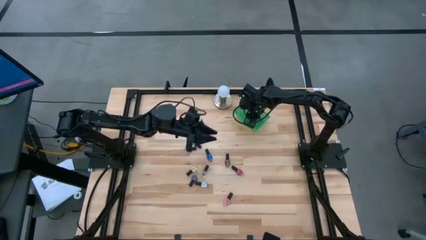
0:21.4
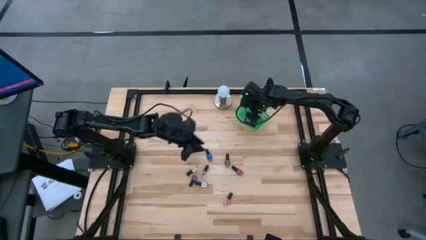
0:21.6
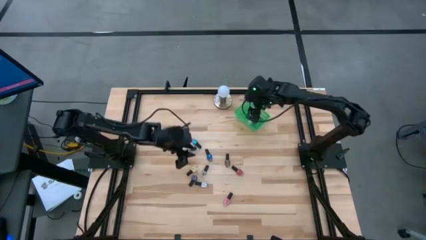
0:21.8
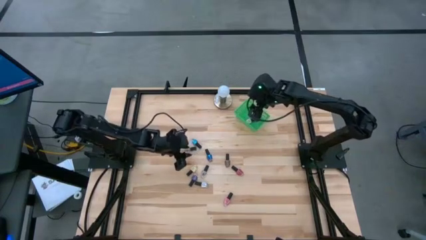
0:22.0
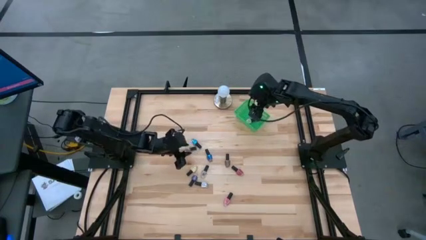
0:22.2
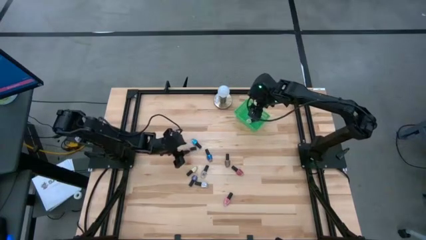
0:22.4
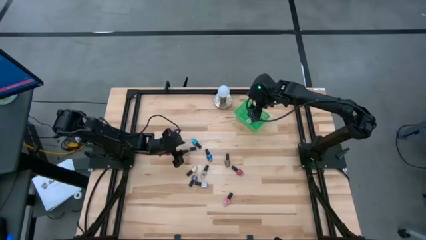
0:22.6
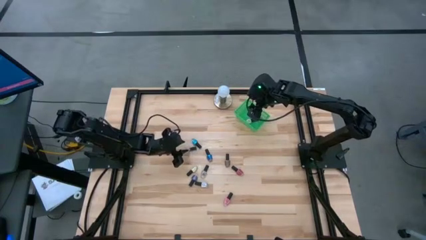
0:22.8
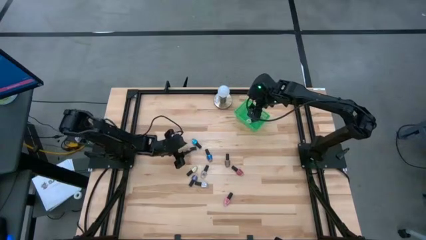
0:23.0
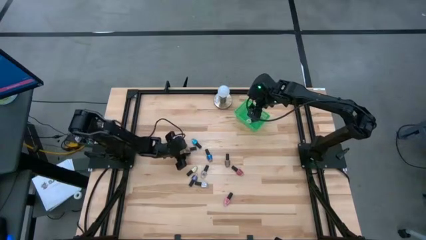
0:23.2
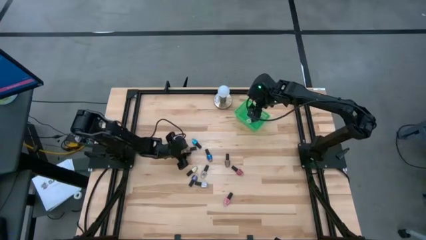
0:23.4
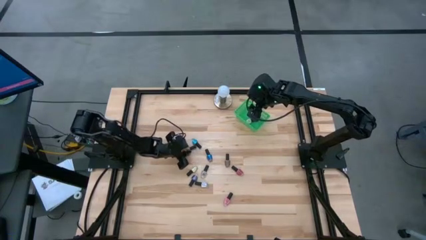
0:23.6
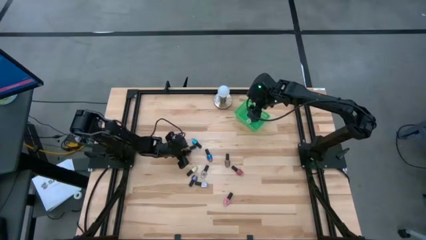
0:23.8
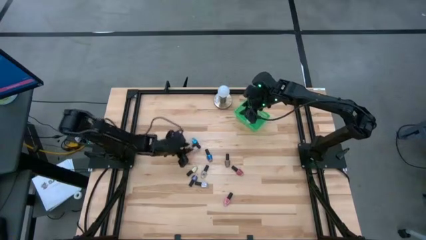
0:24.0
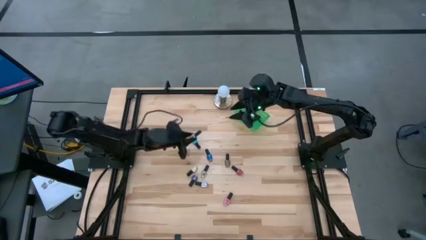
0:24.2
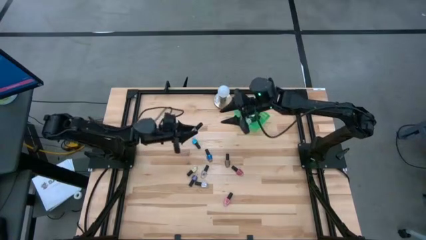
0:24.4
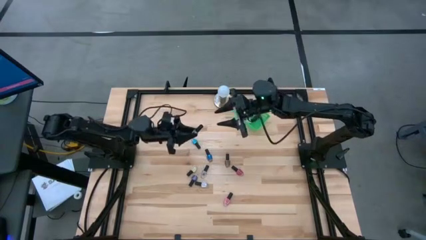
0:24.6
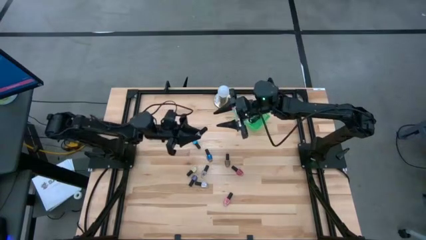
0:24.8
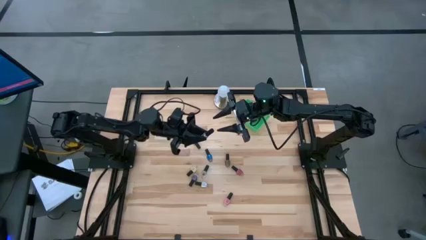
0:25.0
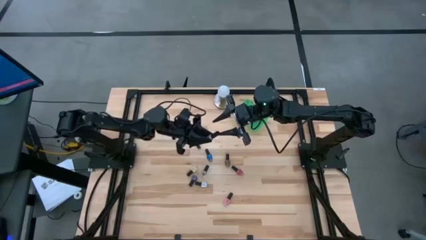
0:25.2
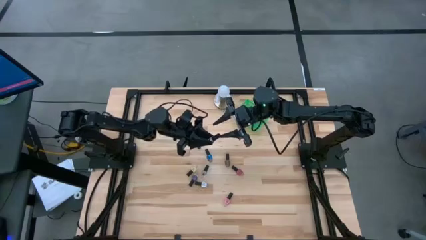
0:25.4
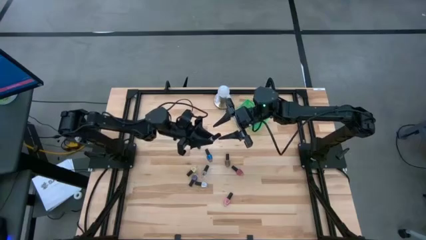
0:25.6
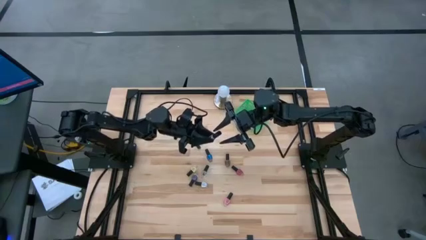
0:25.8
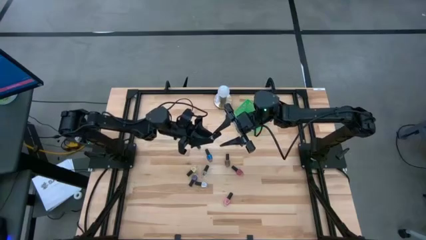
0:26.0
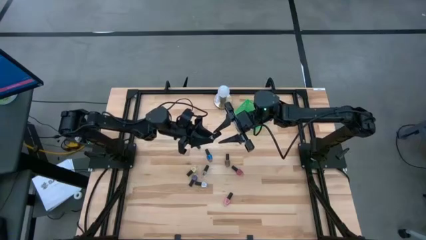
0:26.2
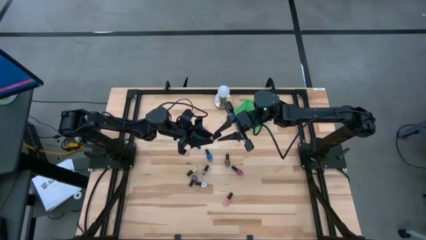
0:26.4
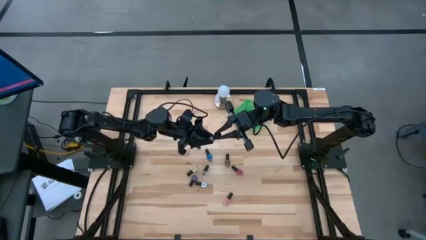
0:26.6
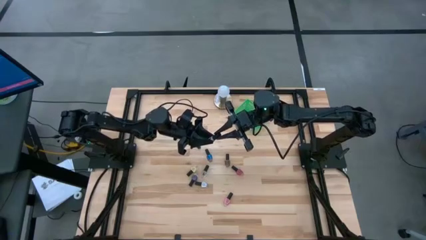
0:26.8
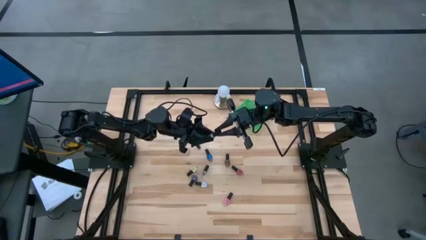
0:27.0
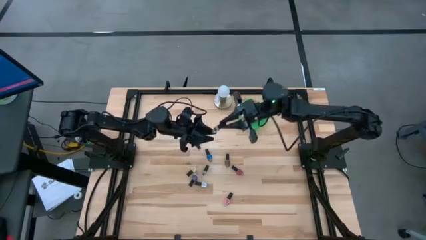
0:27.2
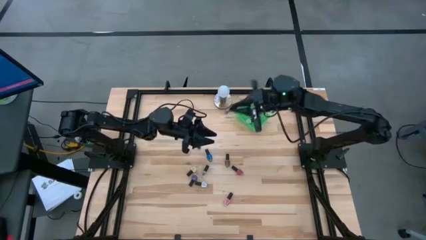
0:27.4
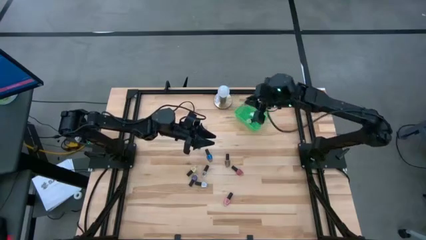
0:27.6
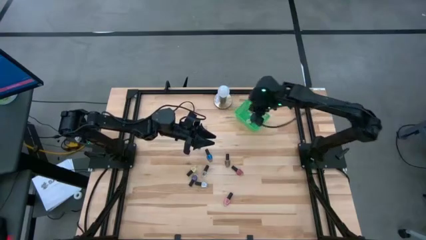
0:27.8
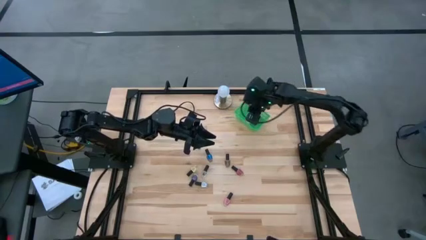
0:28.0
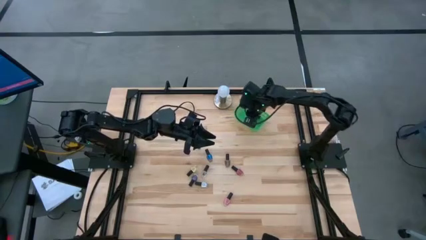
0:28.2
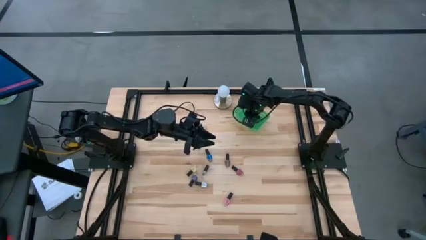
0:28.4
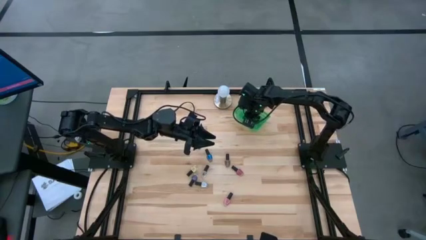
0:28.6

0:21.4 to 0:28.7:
Task: Pick & Place Nail Polish
Put the top transparent nail polish bottle into the green bin

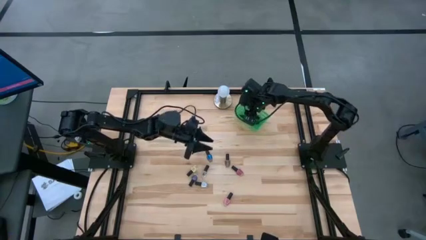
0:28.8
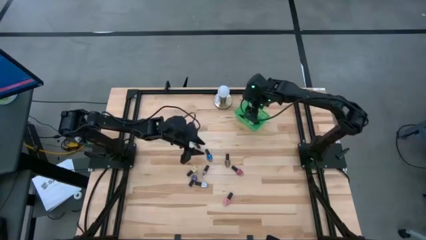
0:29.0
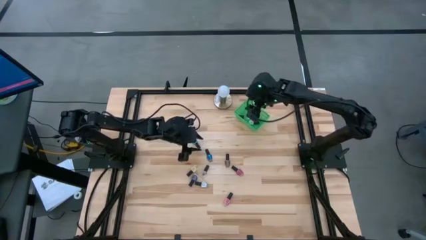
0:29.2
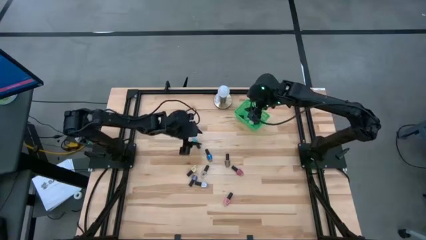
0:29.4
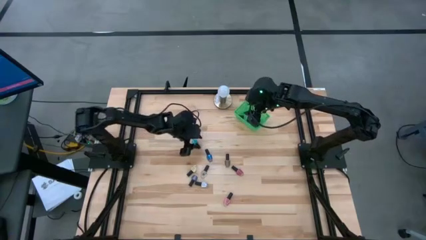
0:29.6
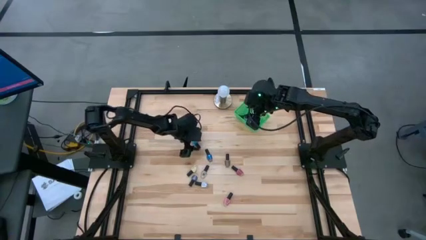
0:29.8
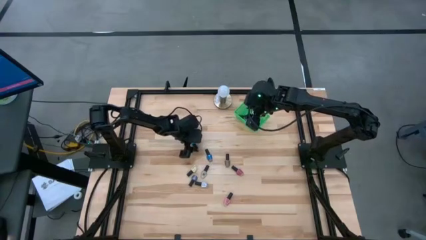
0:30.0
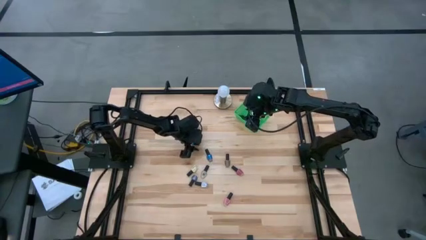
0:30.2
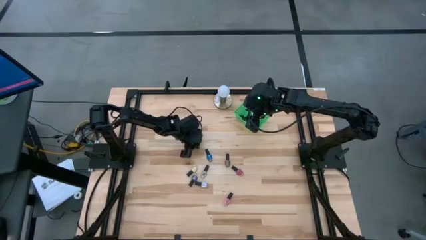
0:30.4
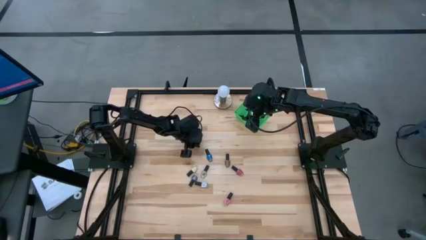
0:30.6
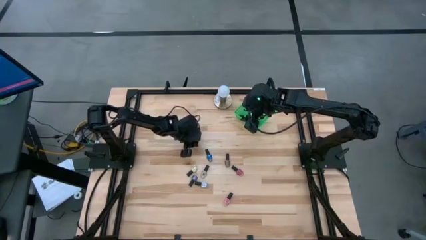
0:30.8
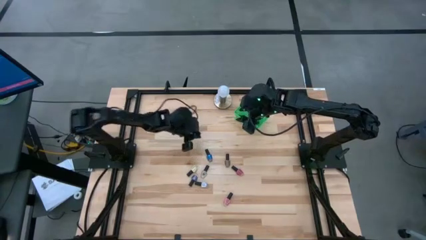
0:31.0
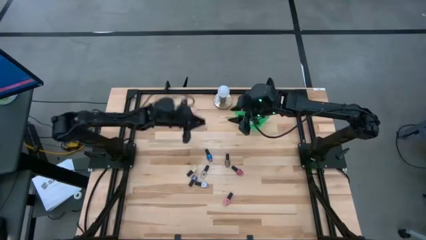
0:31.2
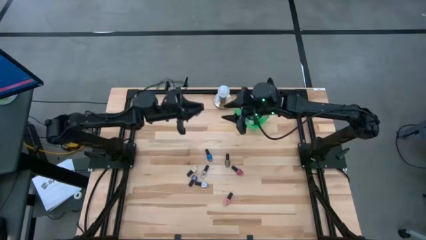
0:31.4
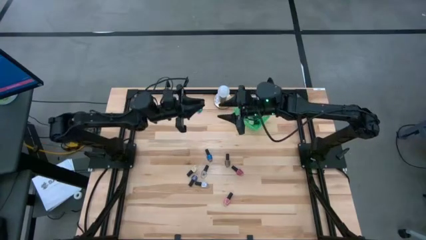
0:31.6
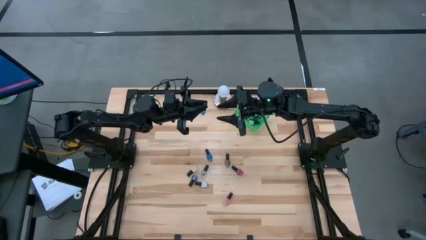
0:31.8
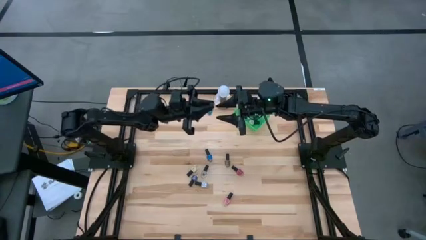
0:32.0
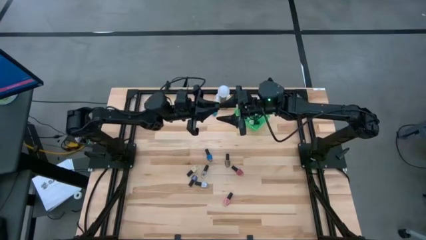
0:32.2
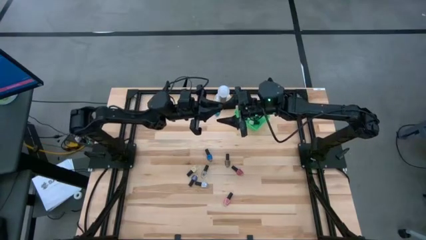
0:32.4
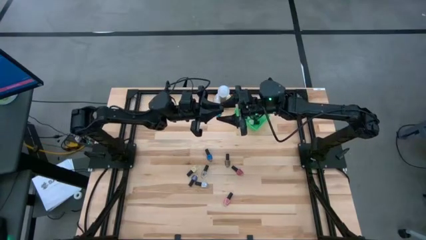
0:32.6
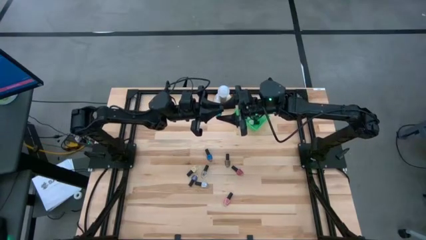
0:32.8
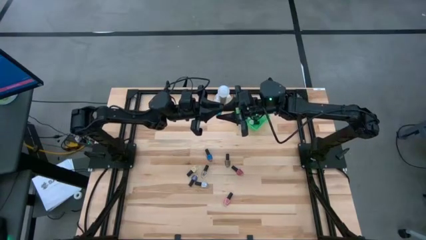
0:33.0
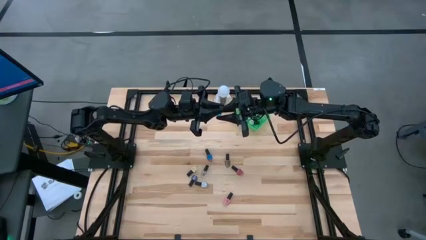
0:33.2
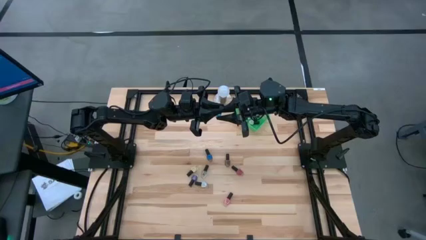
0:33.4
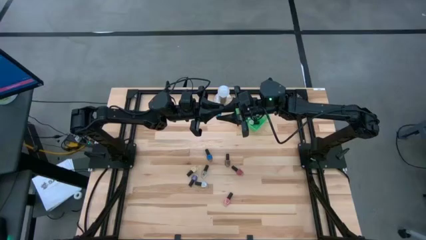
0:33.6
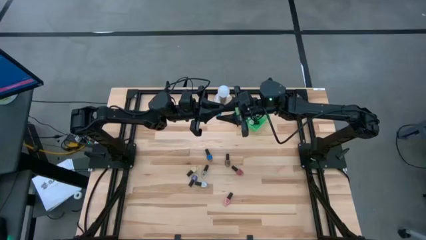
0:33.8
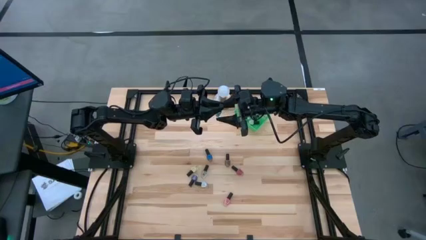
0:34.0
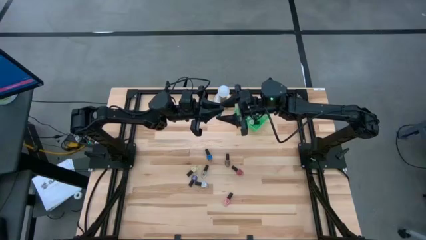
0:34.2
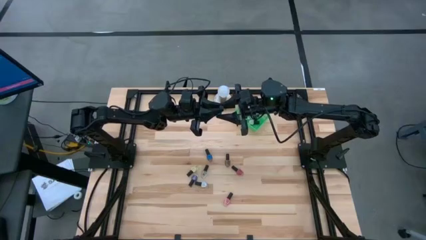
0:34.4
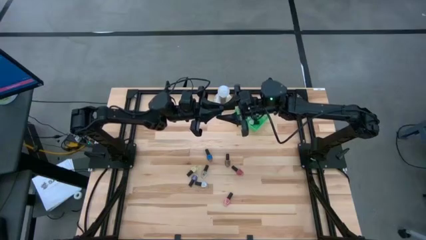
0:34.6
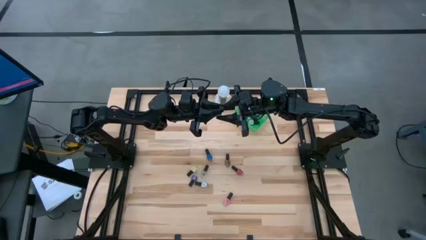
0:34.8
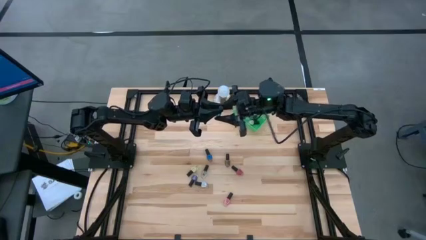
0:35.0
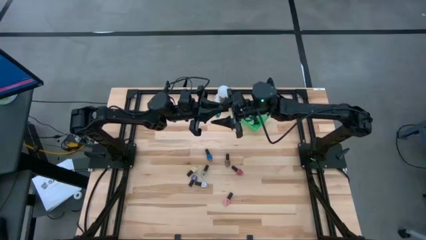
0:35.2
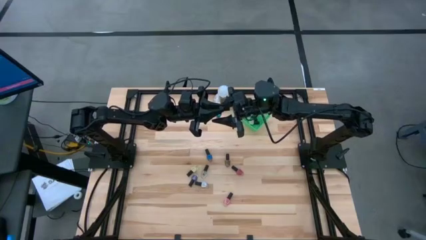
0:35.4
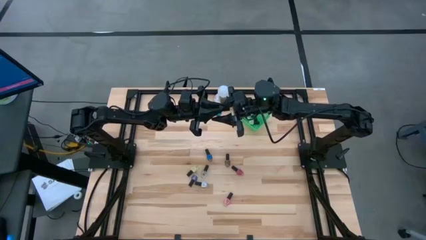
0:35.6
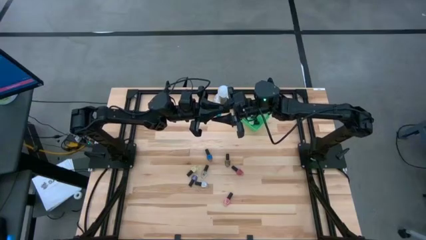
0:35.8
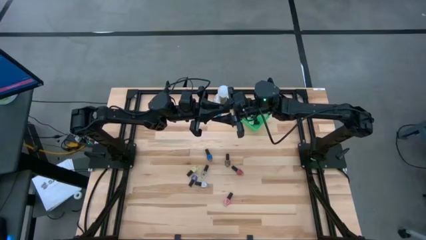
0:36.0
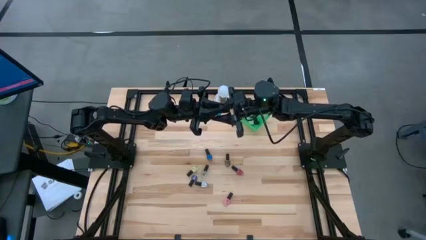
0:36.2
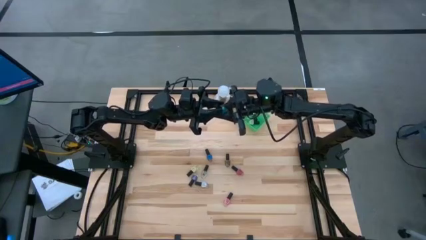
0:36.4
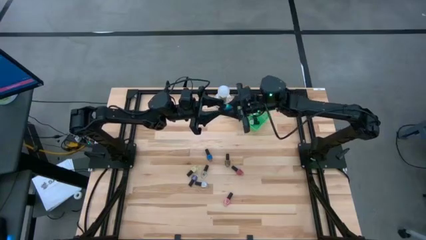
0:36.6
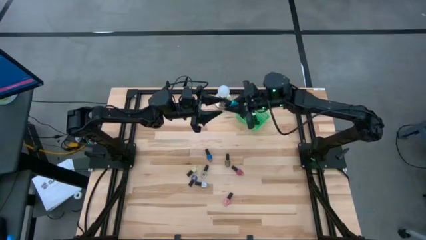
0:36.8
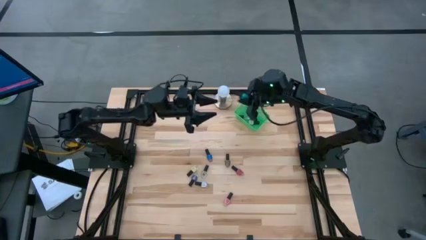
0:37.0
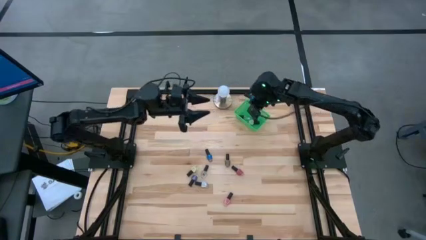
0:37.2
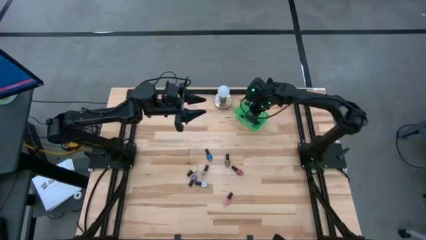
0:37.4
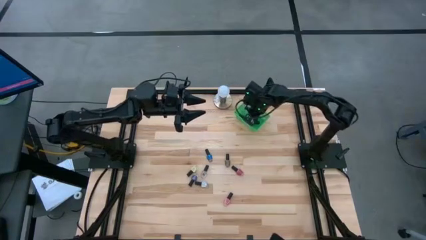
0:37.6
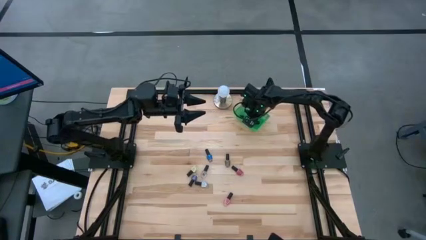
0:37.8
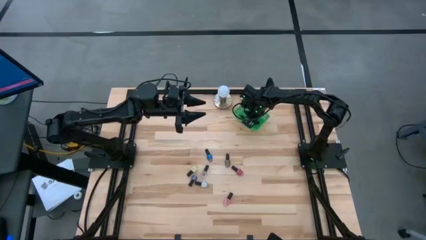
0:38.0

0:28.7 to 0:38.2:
Put the light blue nail polish bottle into the green bin
